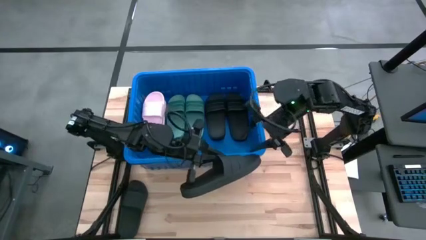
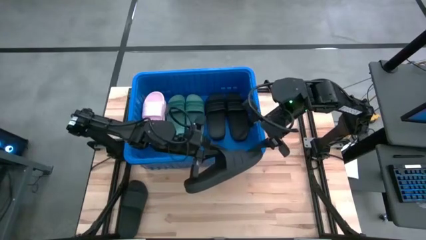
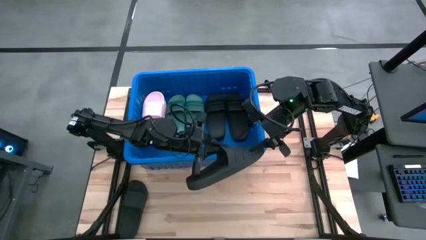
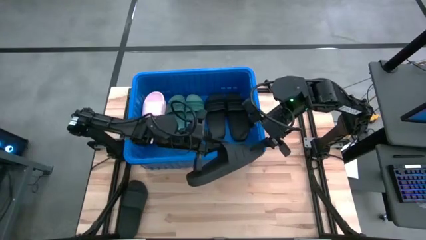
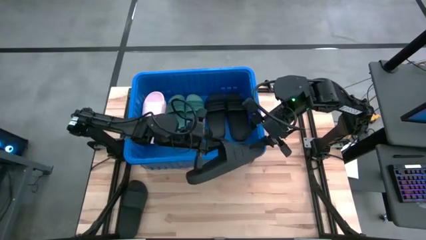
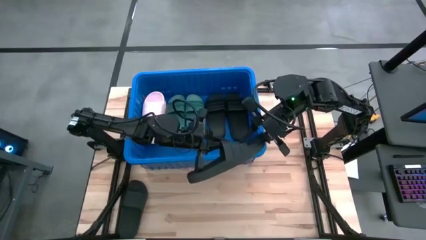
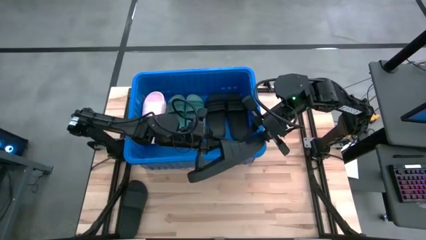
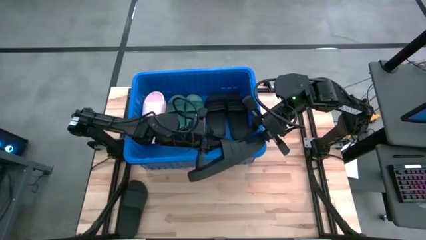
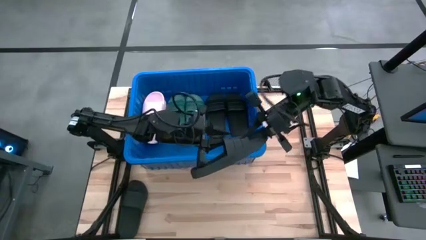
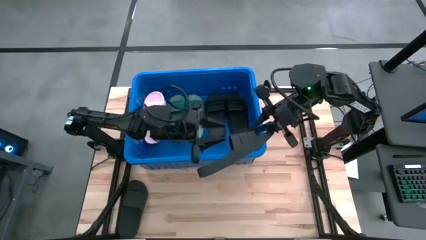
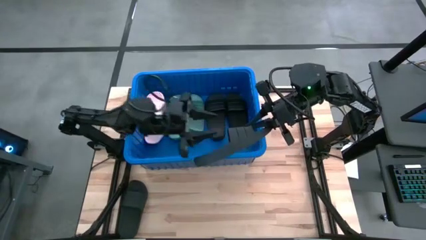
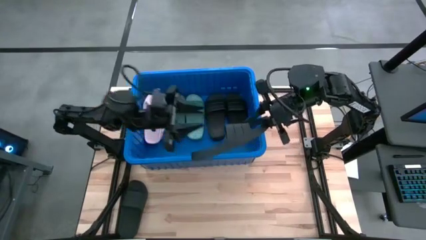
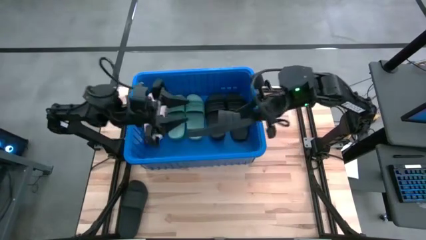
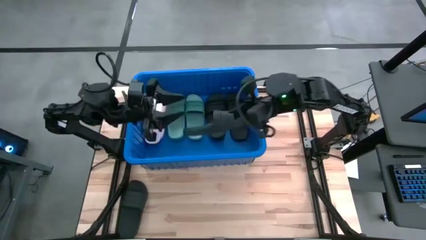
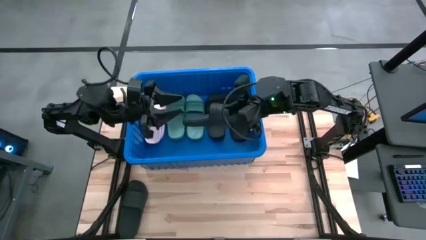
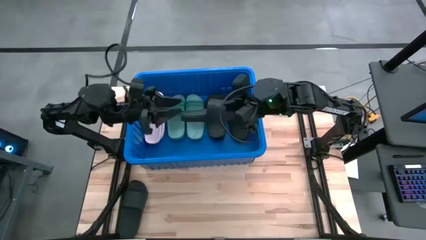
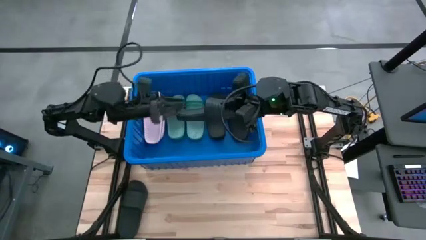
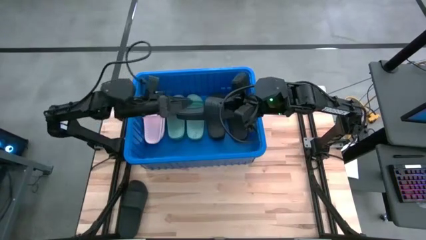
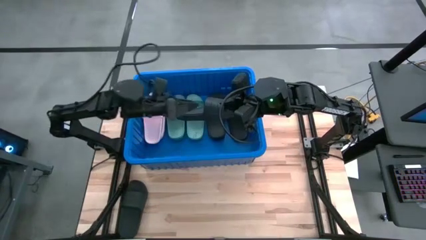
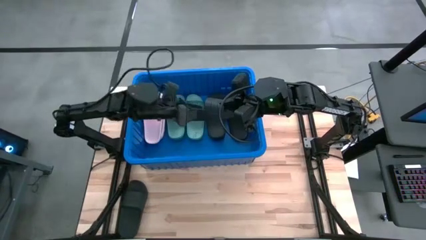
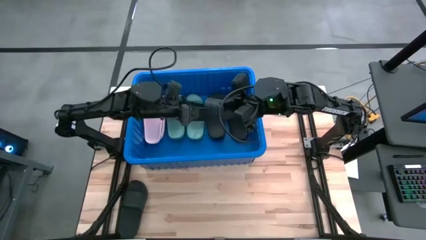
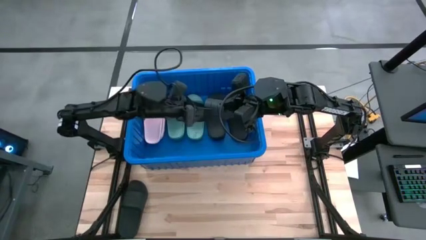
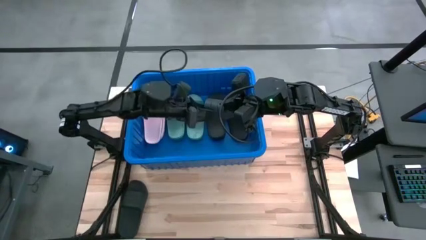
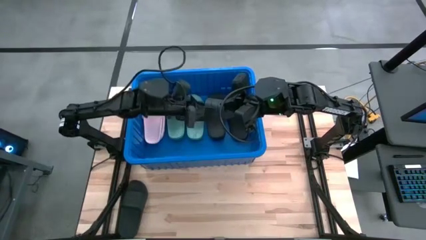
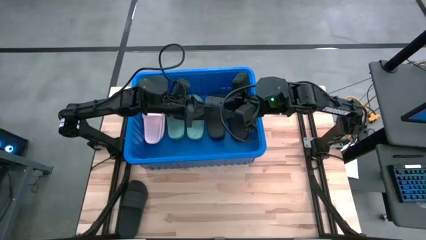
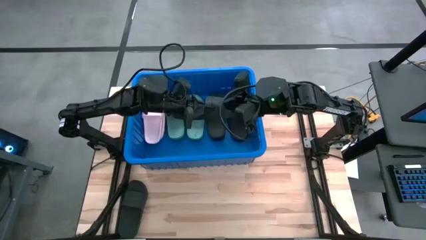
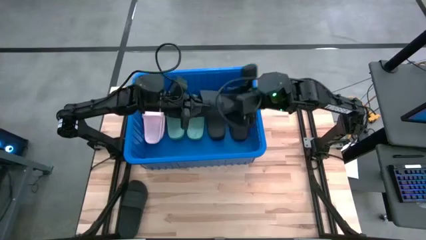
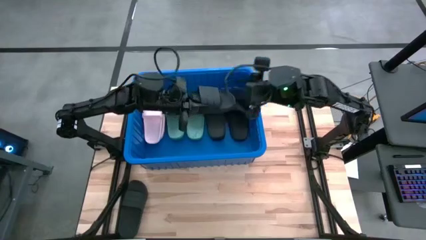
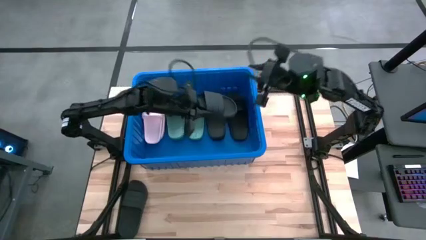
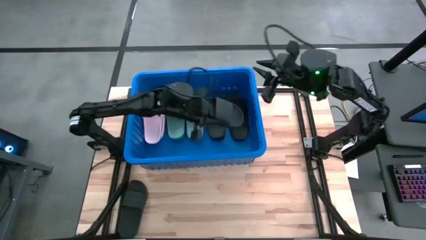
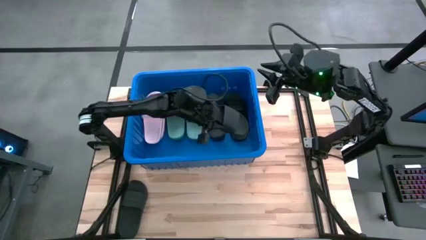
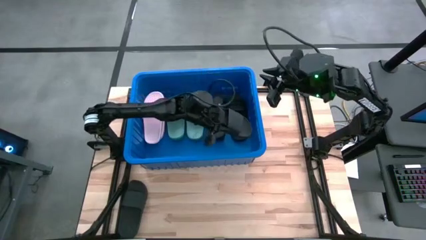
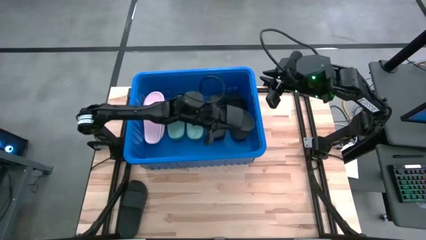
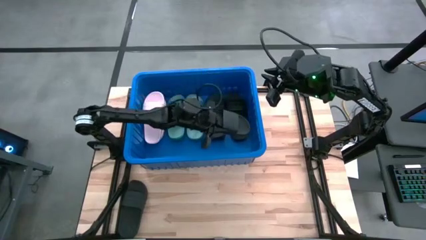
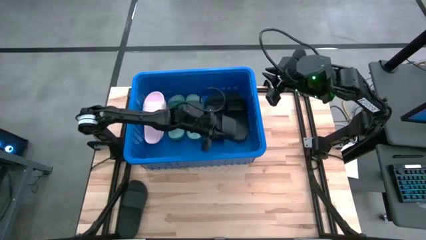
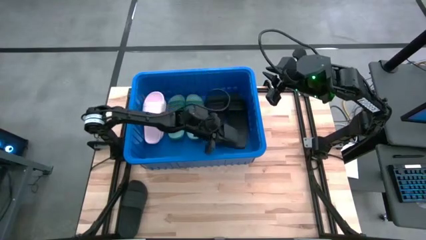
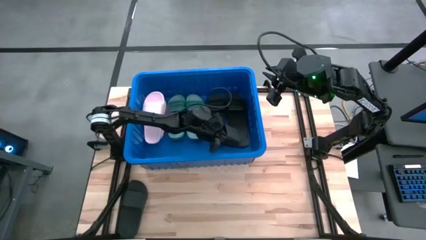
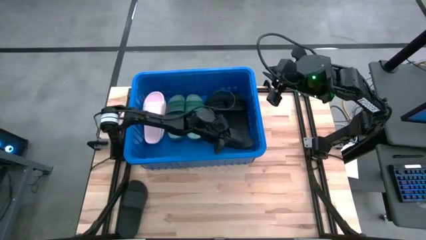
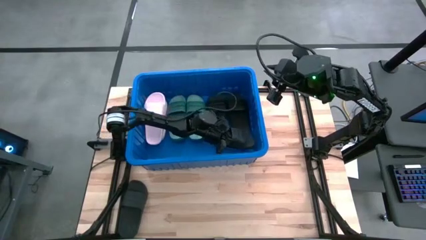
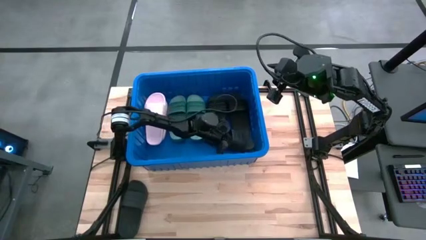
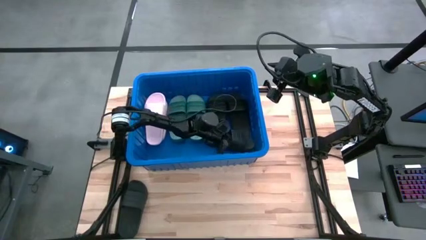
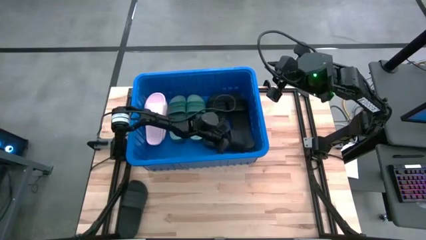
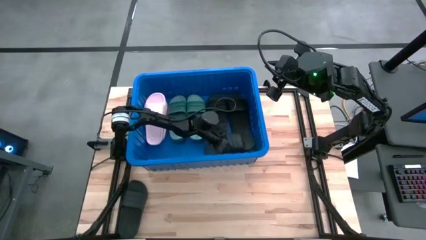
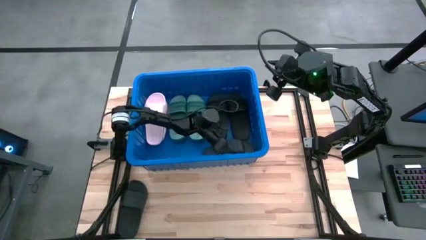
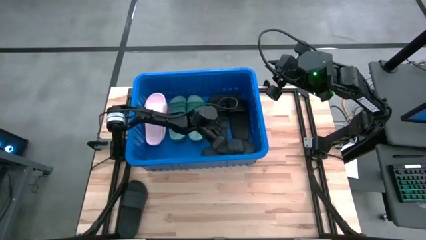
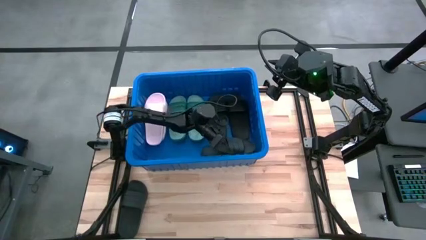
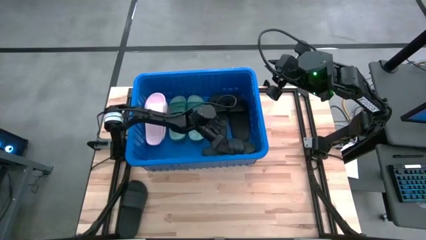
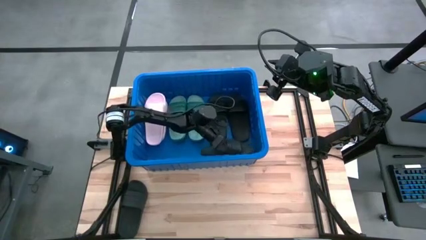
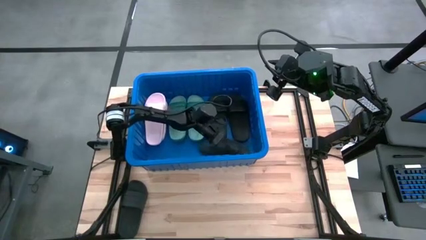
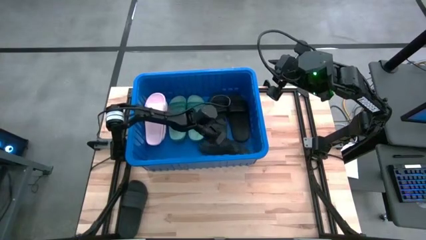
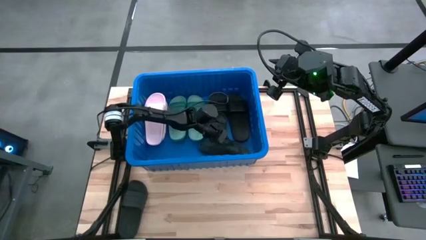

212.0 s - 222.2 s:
Task: Pick and place slides into bin
Put the black slide into the blue bin

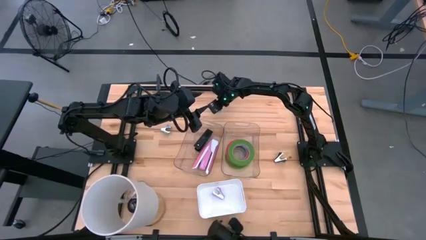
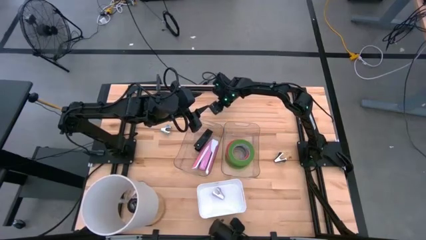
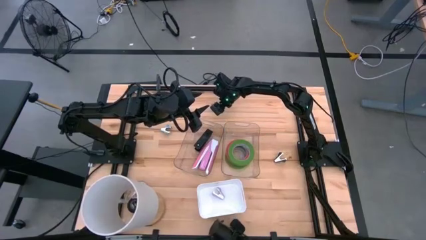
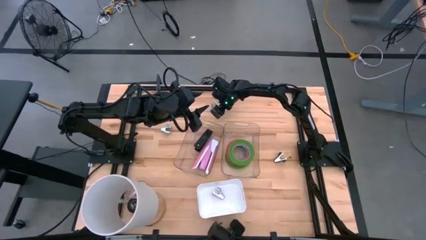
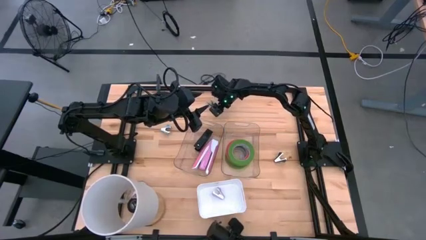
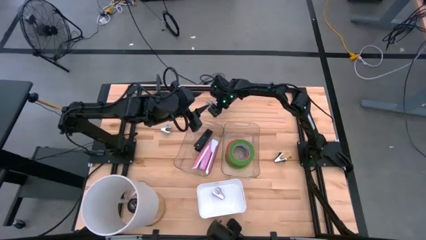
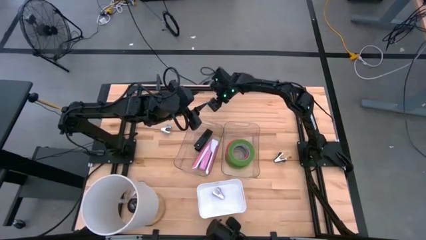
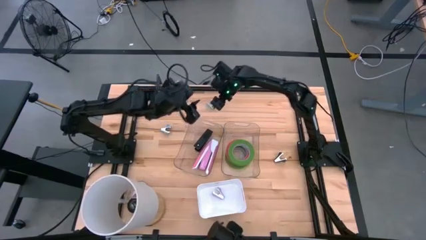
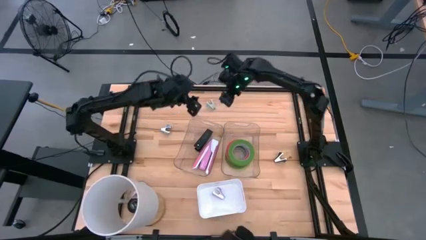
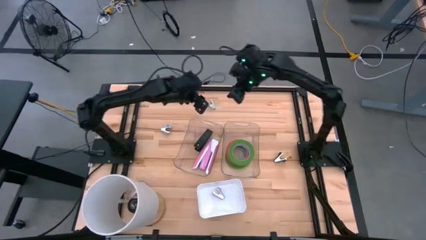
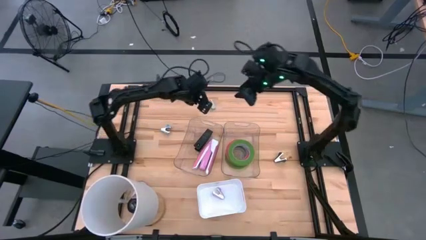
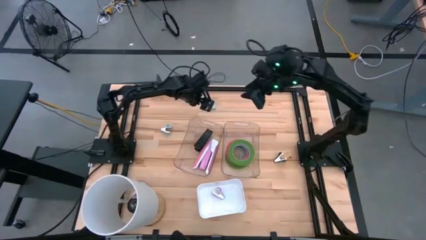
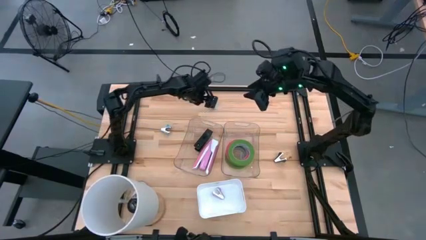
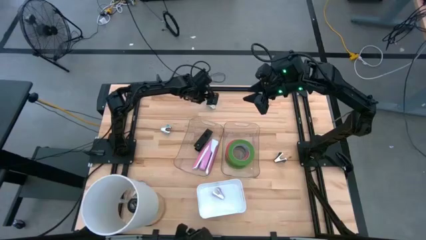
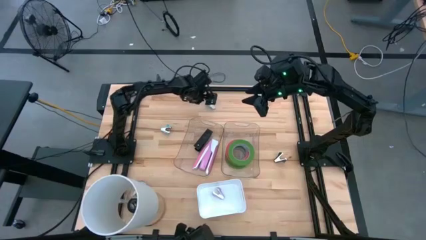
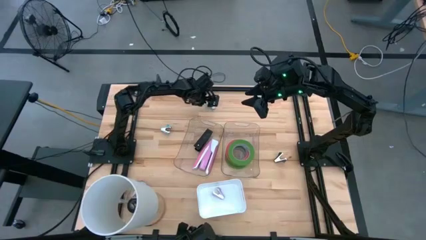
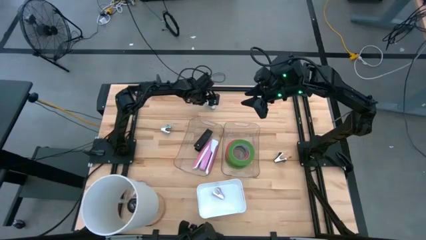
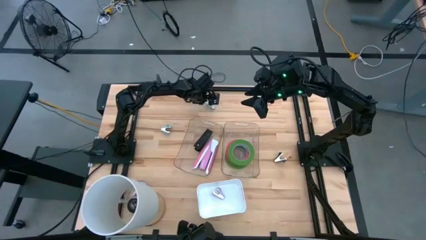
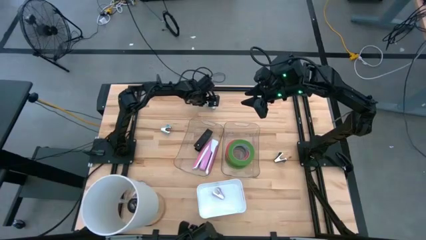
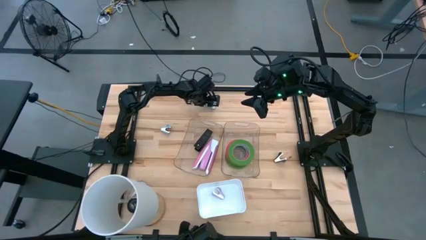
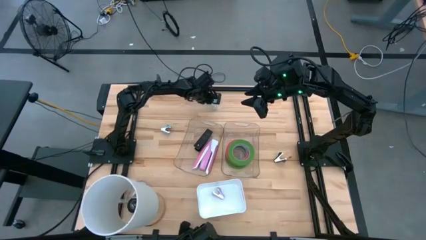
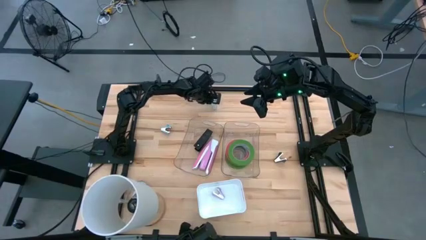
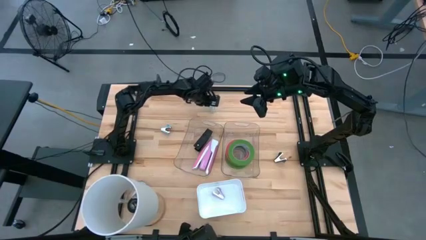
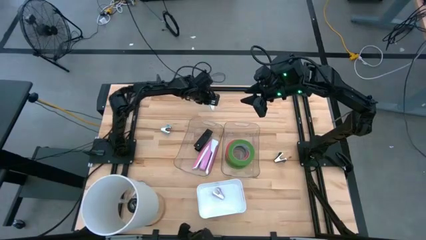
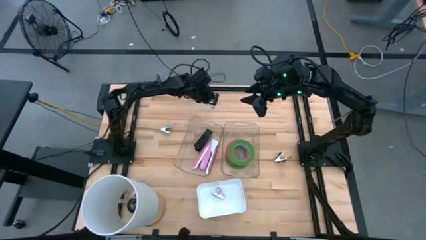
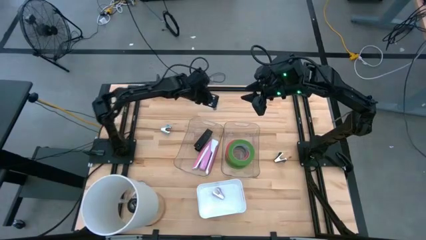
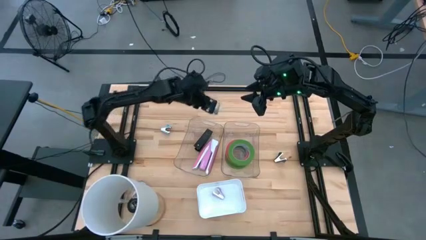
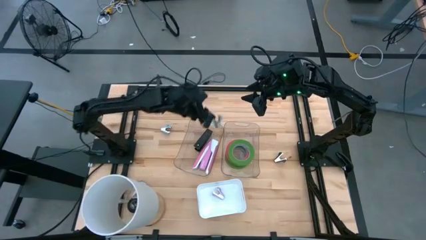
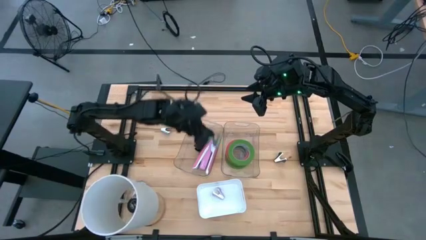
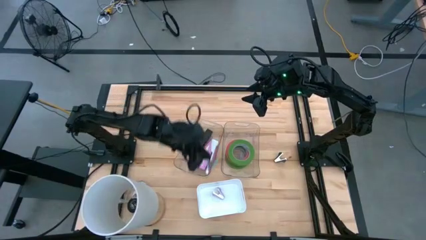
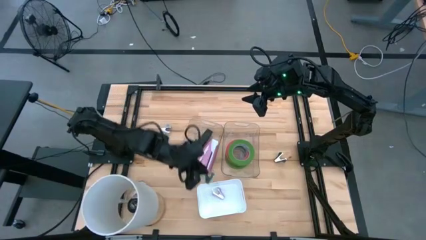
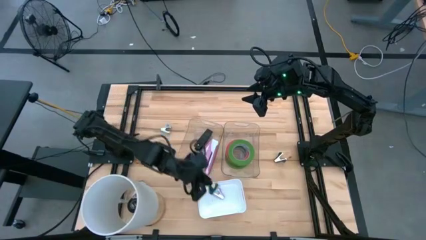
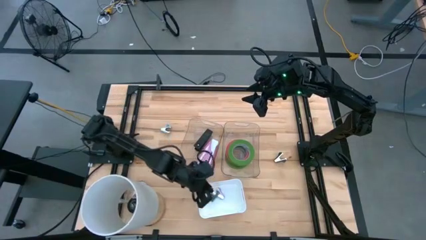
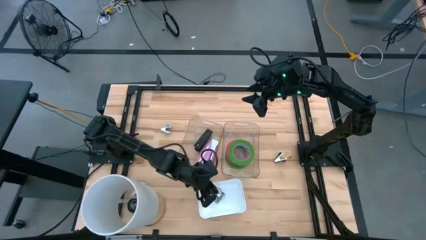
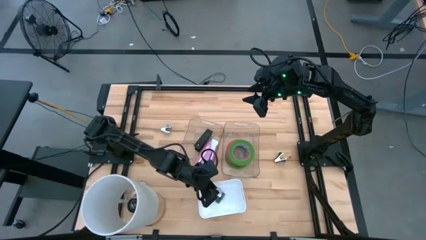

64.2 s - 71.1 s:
Task: Pick and place Stapler, Stapler remover, tape
Put the blue staple remover into the white bin
